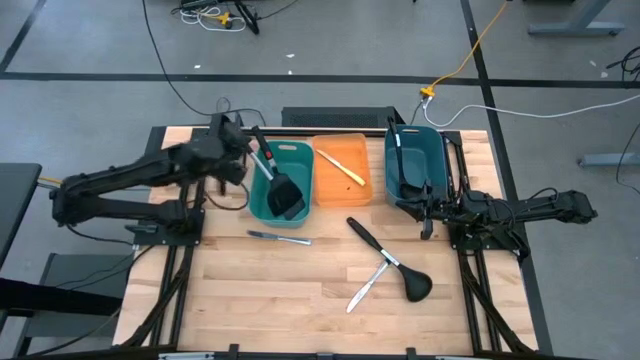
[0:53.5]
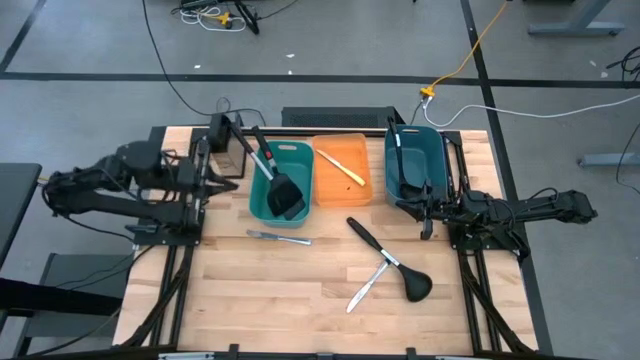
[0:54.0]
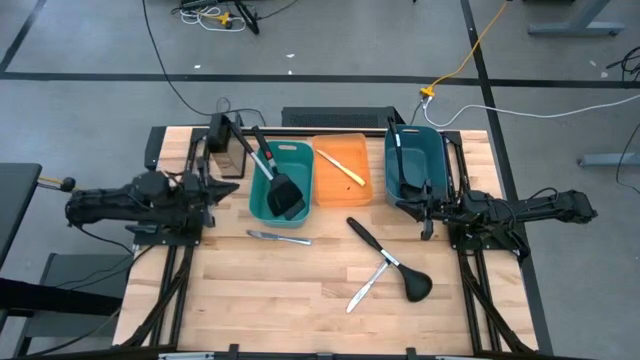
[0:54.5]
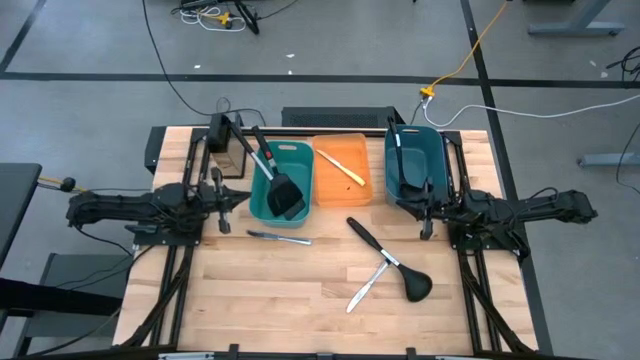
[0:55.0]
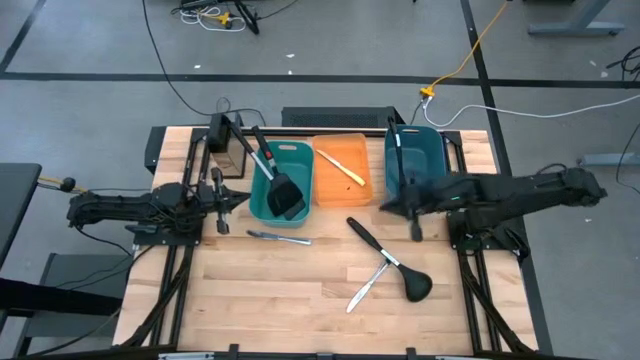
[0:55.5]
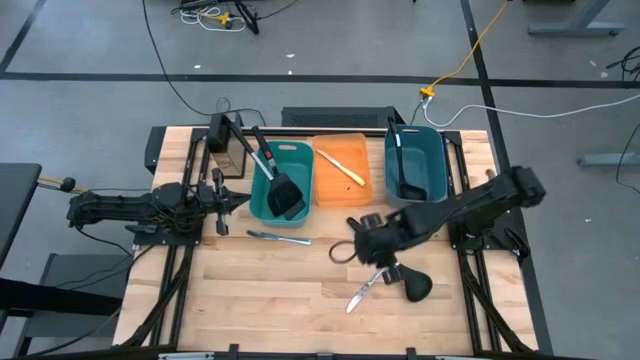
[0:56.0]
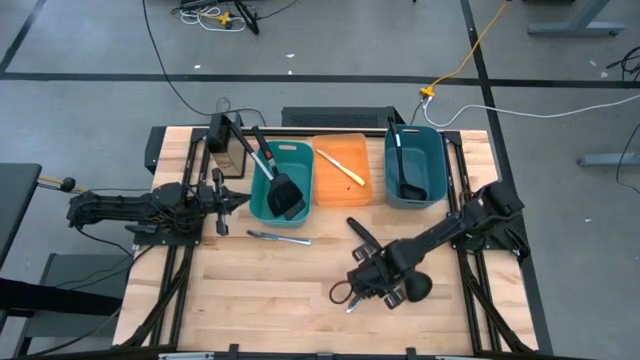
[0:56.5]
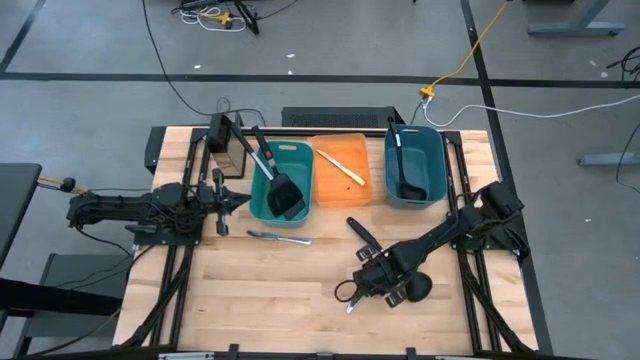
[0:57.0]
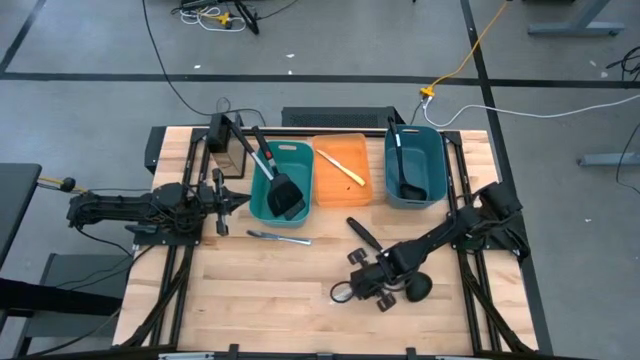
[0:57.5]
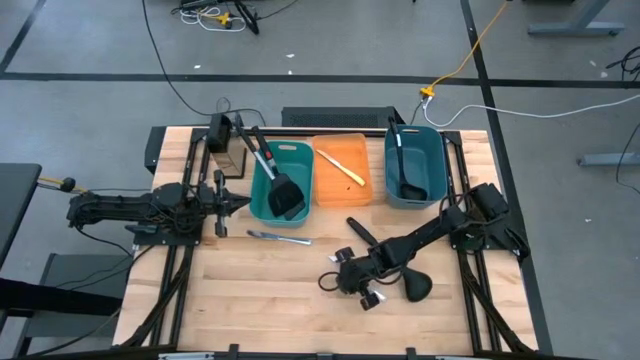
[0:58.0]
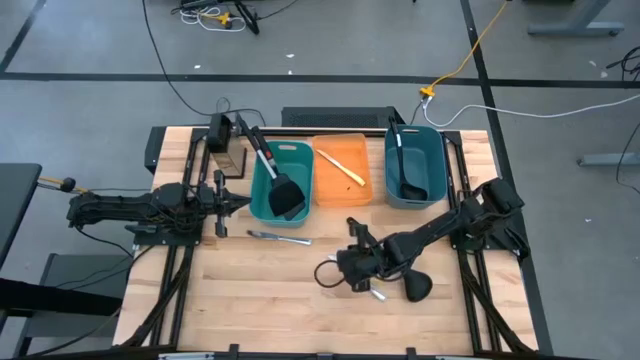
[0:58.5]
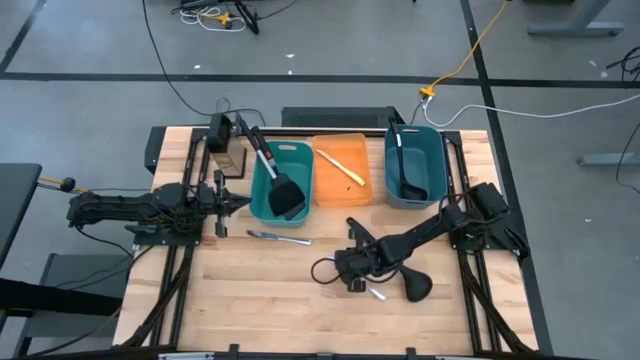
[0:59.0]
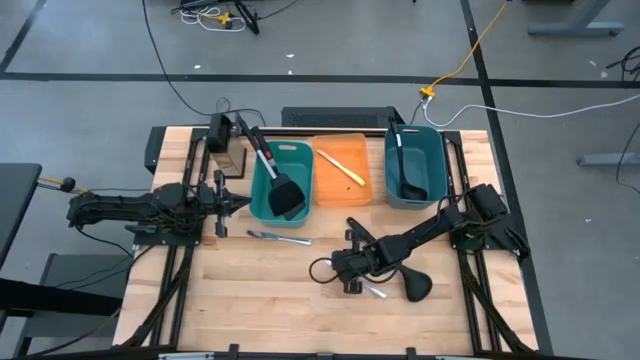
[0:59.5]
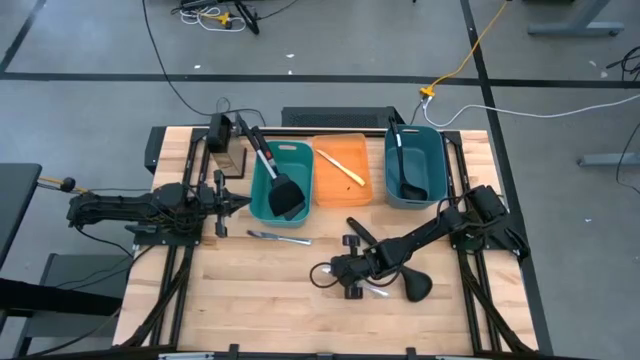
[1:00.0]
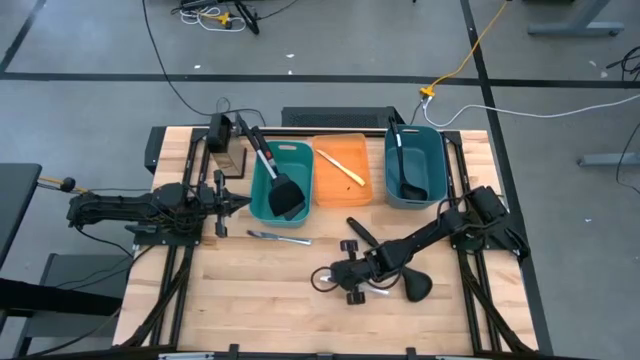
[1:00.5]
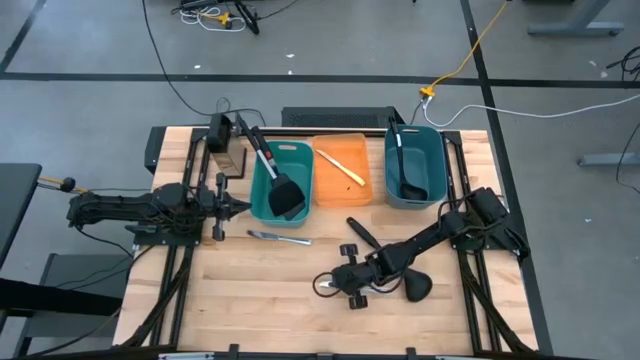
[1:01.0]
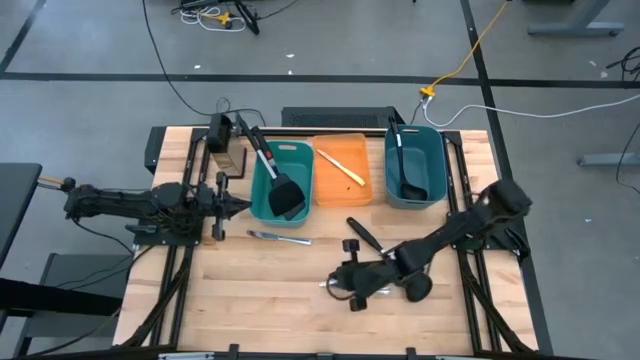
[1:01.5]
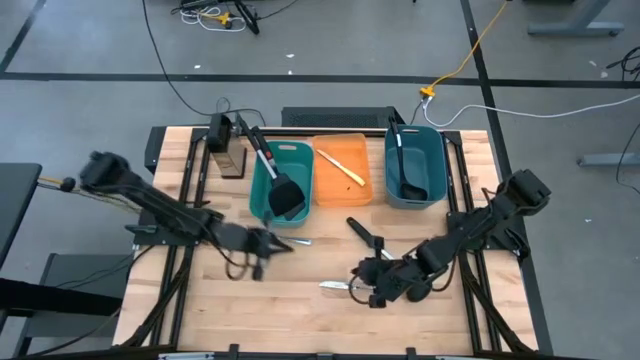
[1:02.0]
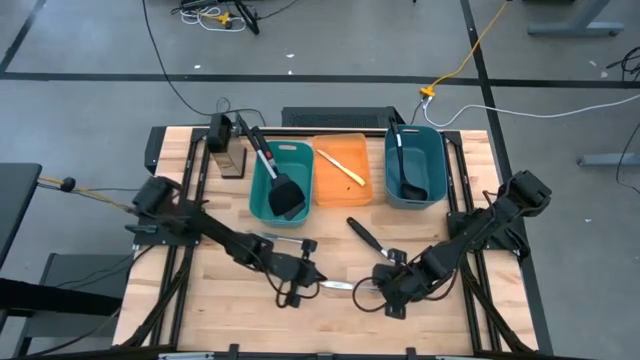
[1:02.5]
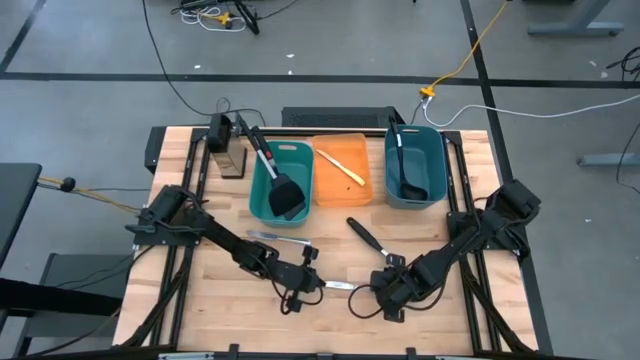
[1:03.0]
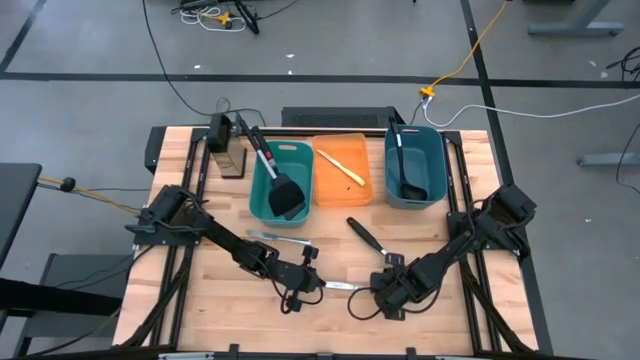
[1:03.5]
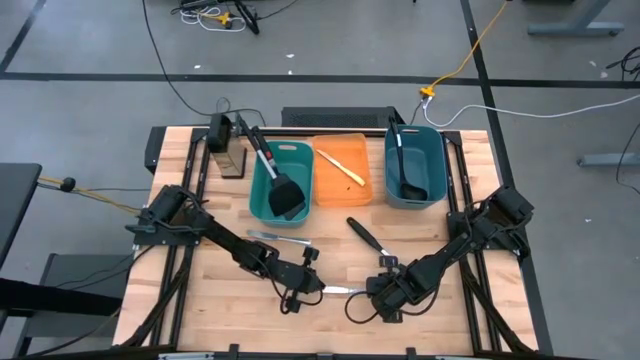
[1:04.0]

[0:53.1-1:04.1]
Task: Pick & Place Kitchen Items
Put the right silver table knife into the orange bin

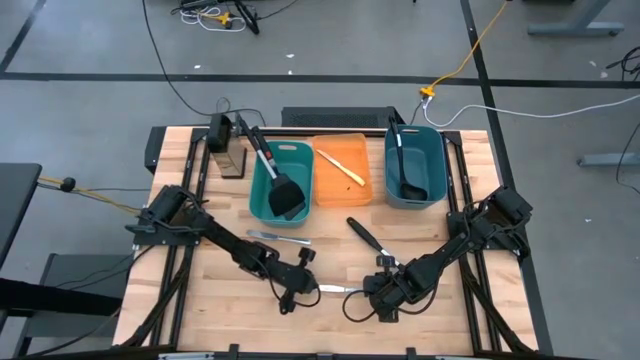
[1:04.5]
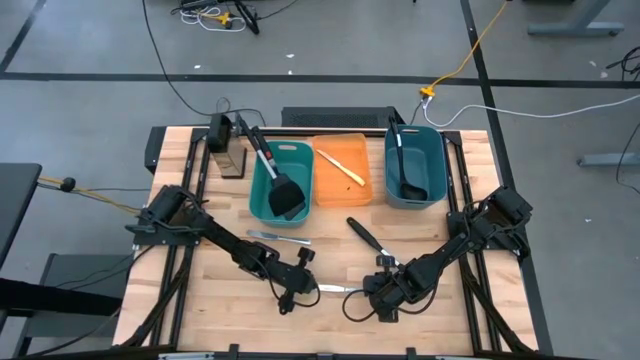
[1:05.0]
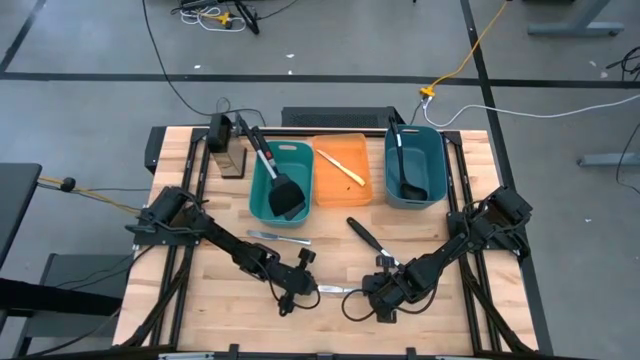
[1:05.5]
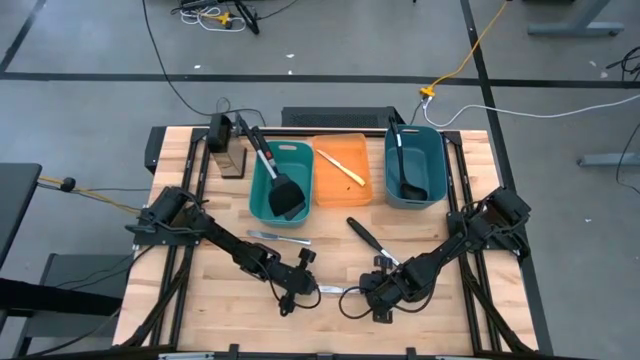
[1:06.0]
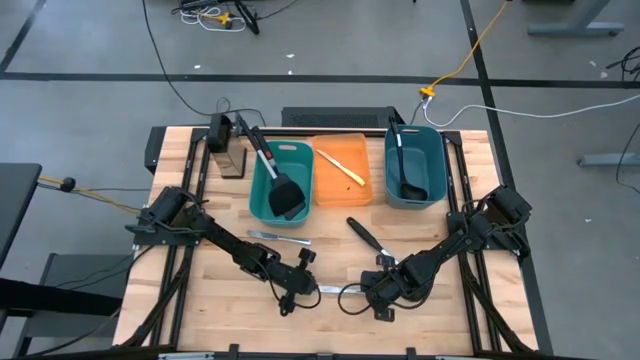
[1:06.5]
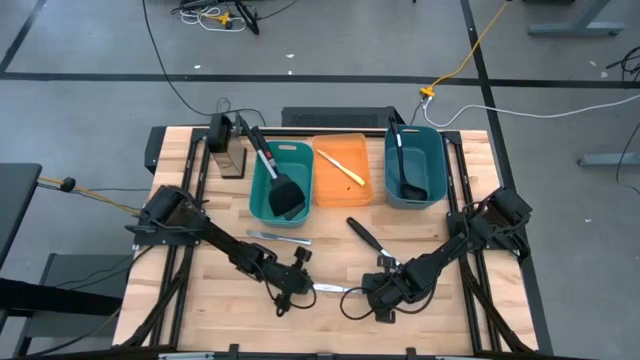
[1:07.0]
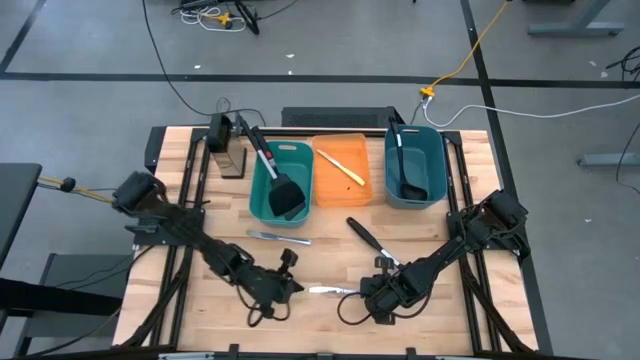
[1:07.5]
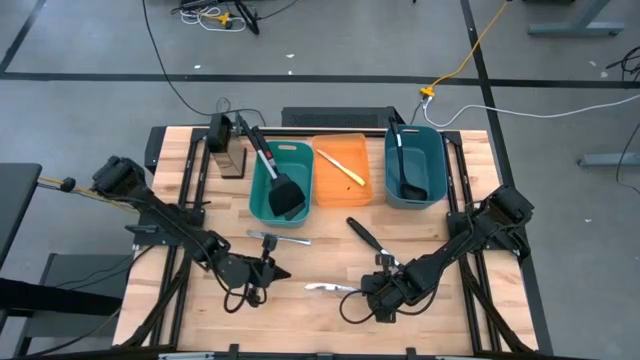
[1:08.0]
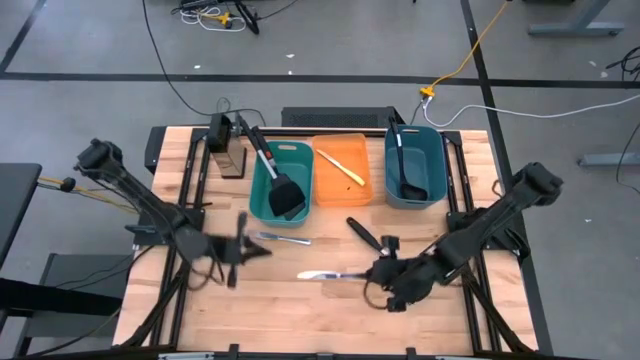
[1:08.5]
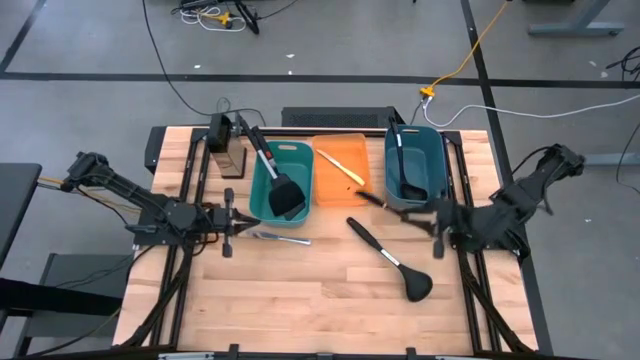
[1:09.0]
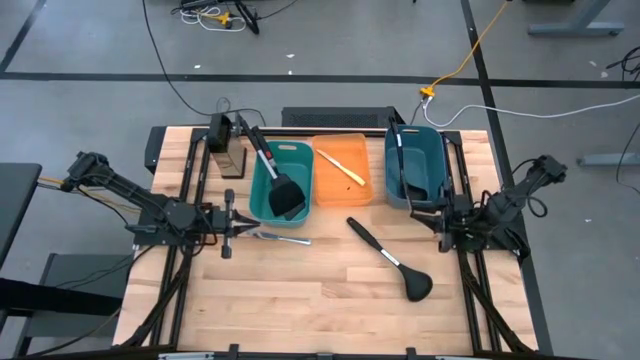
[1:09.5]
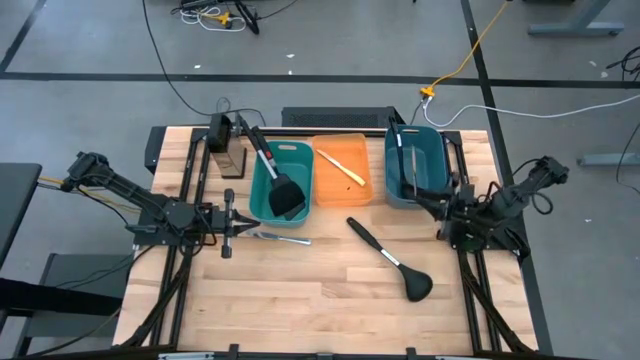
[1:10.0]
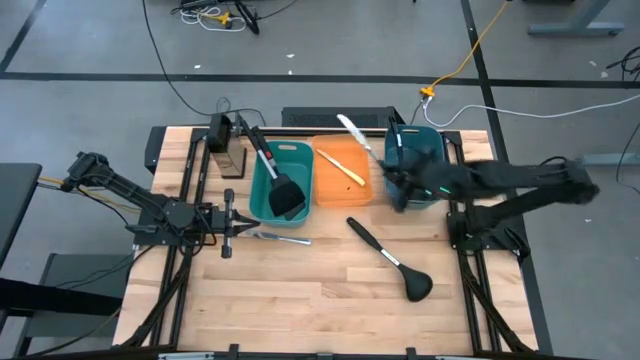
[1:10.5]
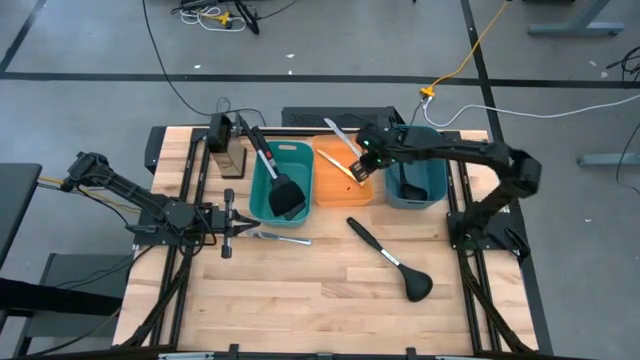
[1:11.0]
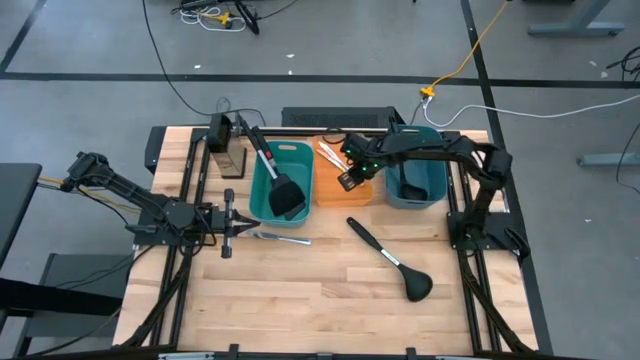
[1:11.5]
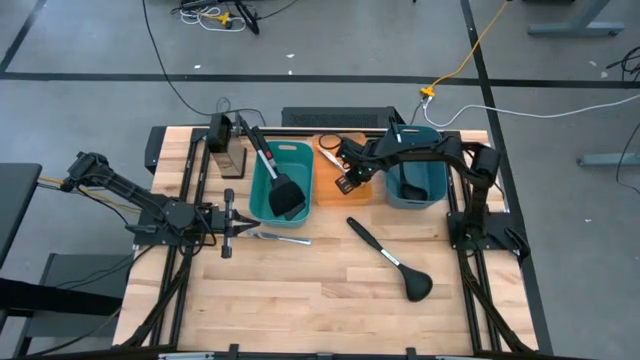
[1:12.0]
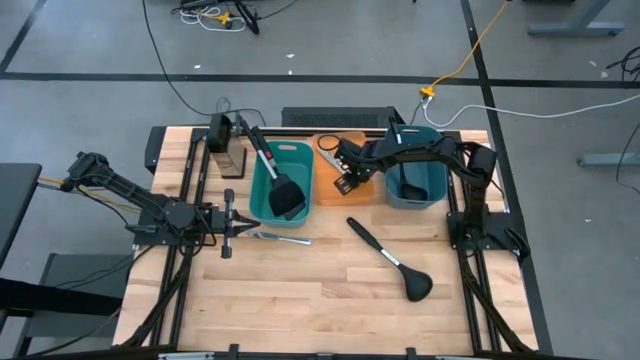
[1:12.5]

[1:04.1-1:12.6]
Put the right silver table knife into the orange bin

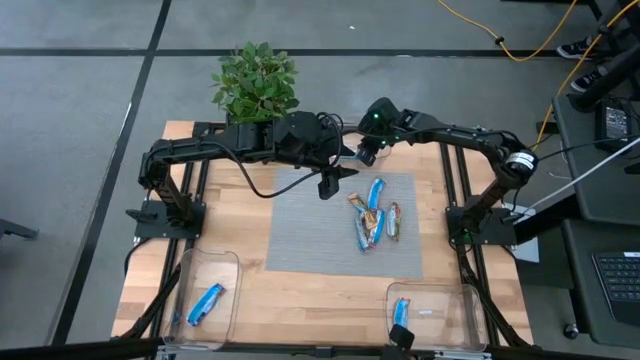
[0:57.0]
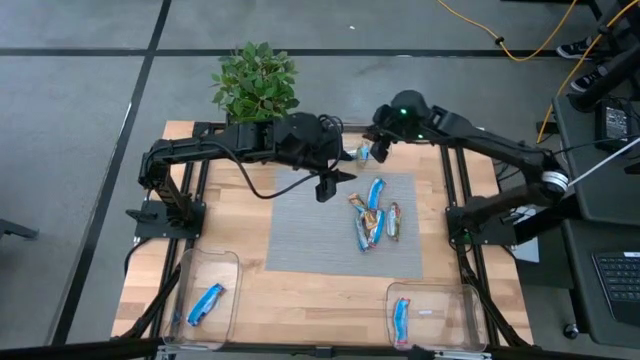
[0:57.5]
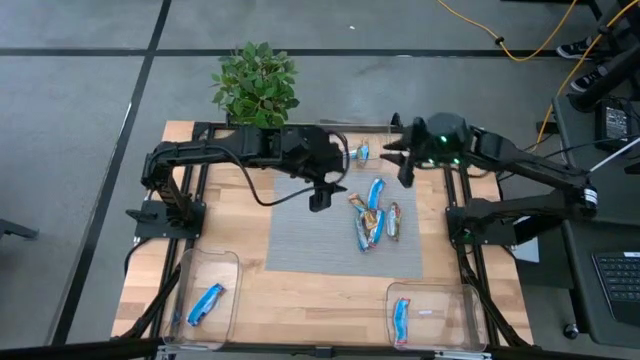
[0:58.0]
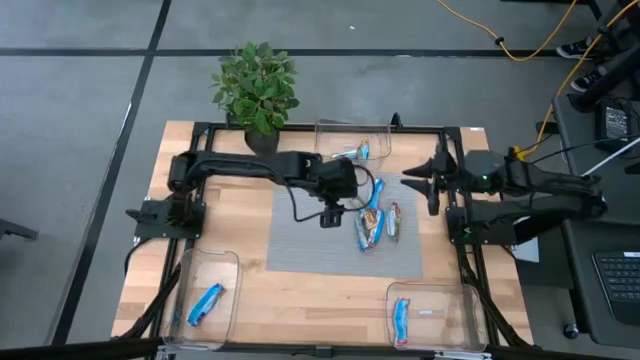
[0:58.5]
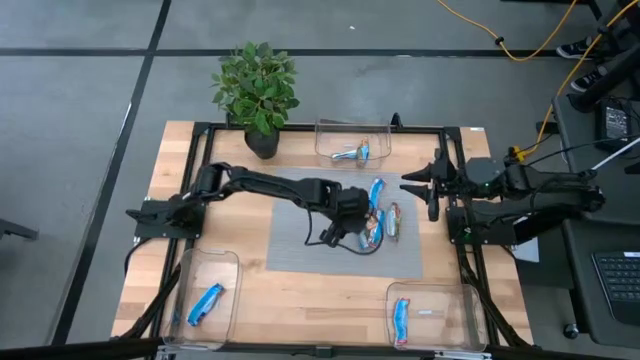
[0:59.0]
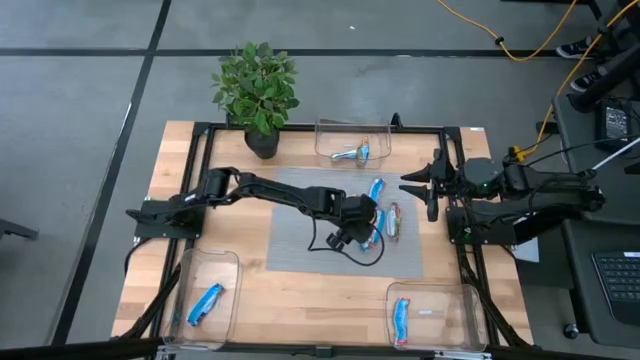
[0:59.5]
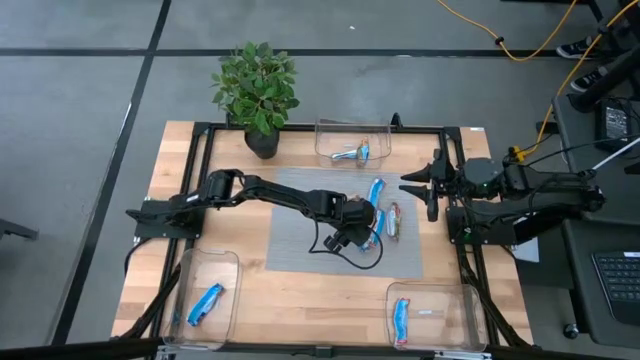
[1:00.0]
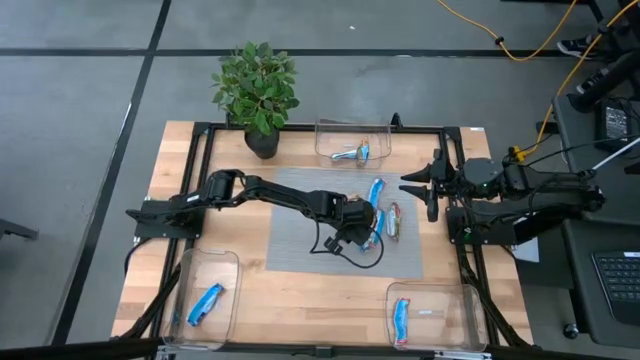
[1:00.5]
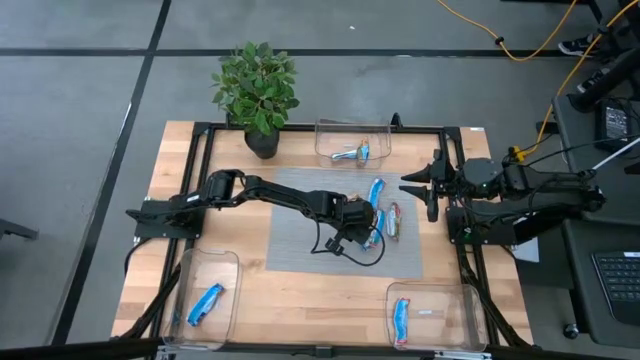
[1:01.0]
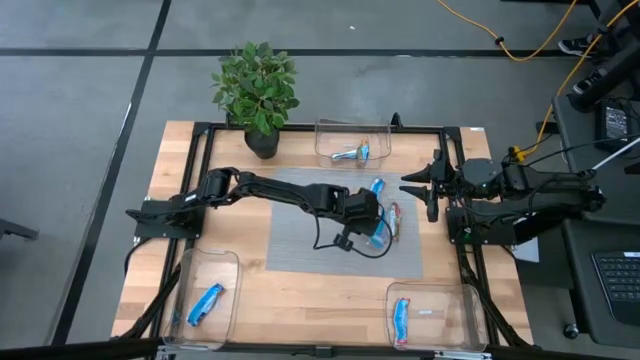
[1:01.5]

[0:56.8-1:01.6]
Task: Pick and place Granola Bars by type
Put the blue granola bar into the bottom left transparent bin
